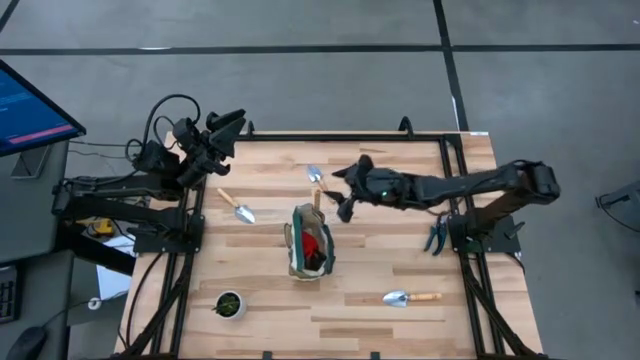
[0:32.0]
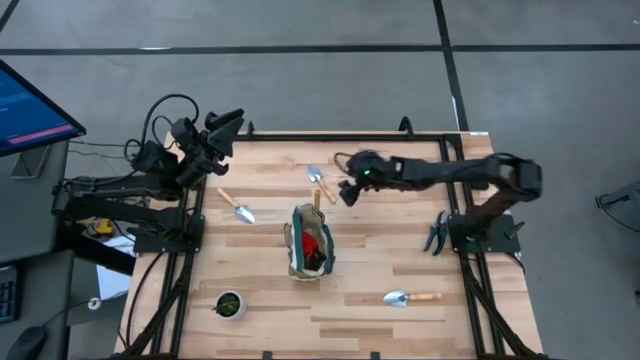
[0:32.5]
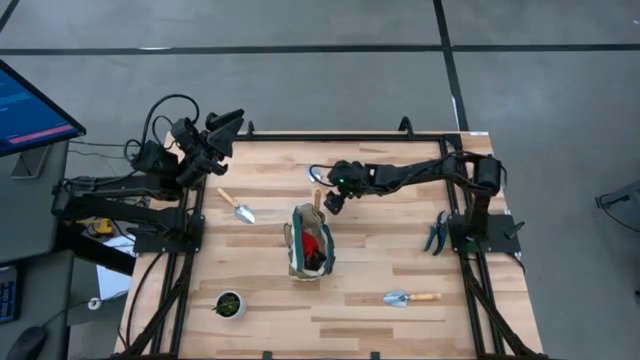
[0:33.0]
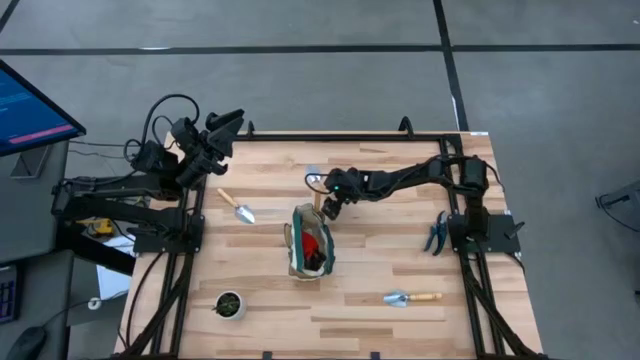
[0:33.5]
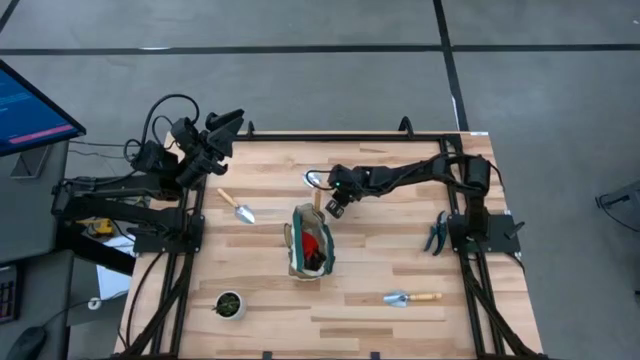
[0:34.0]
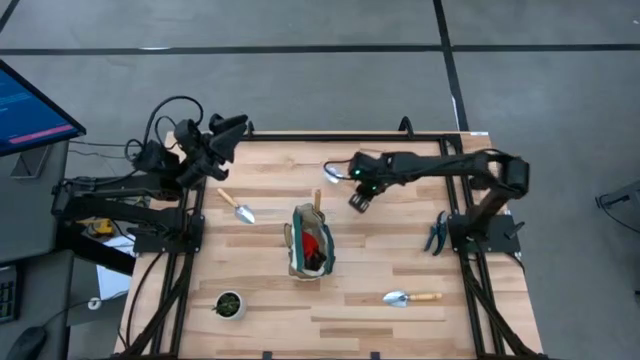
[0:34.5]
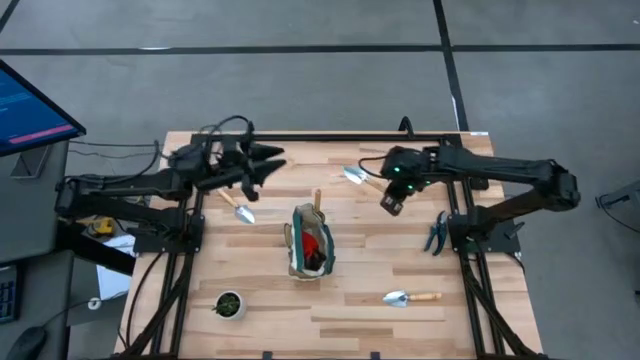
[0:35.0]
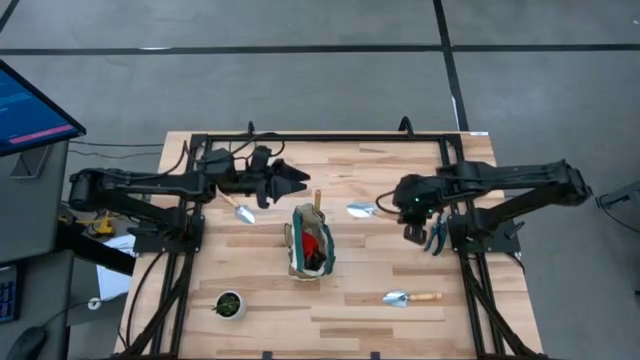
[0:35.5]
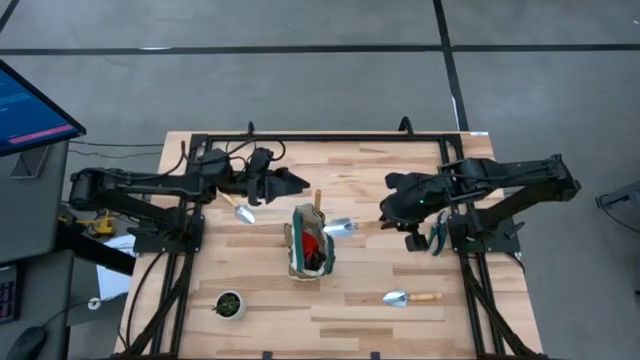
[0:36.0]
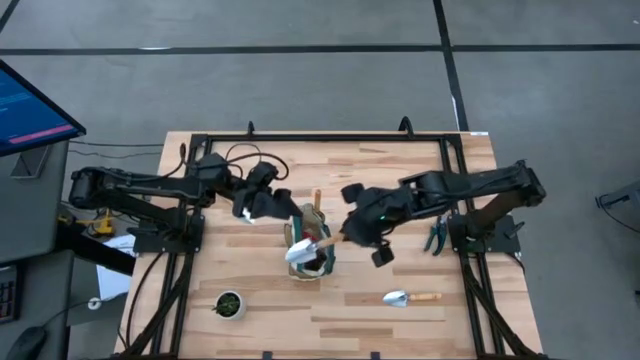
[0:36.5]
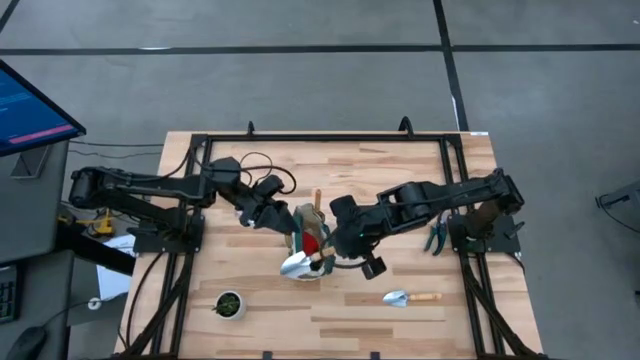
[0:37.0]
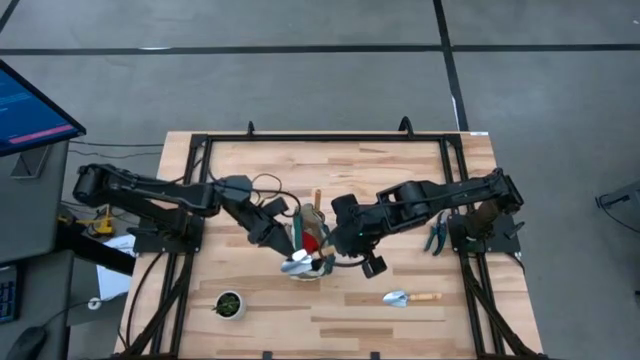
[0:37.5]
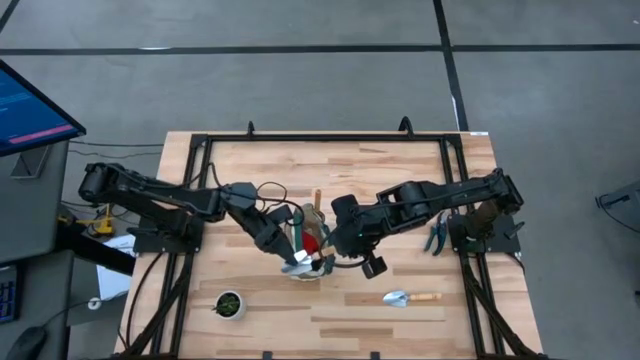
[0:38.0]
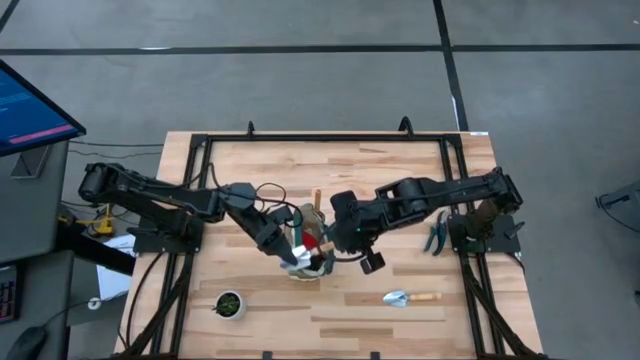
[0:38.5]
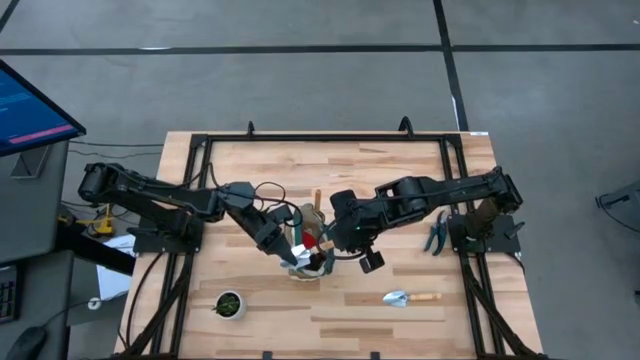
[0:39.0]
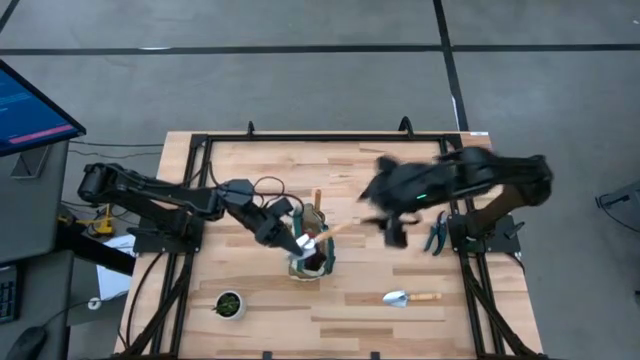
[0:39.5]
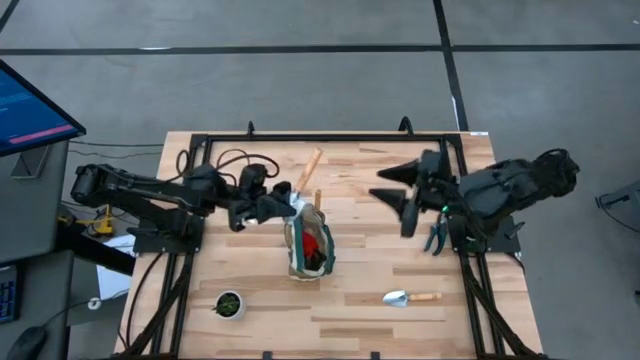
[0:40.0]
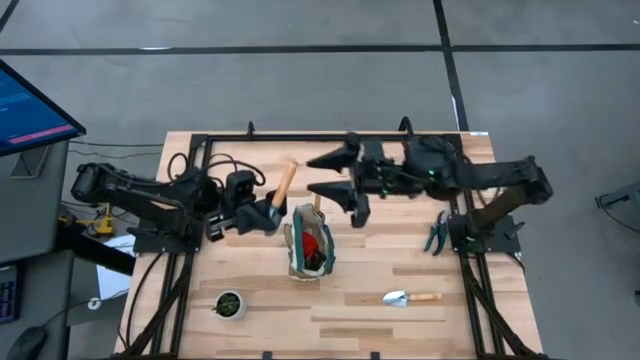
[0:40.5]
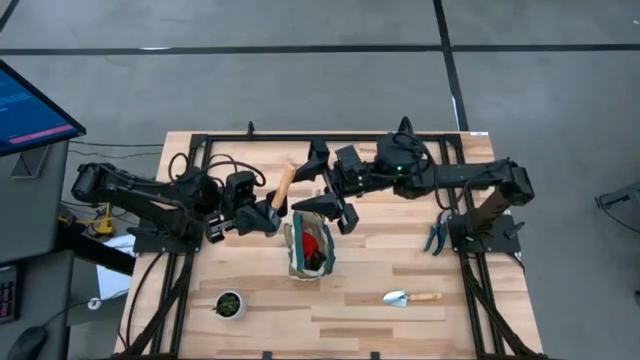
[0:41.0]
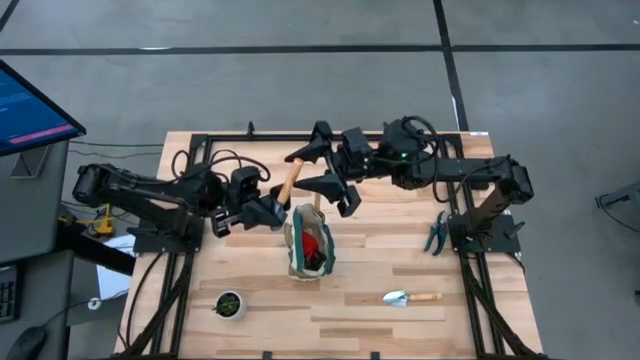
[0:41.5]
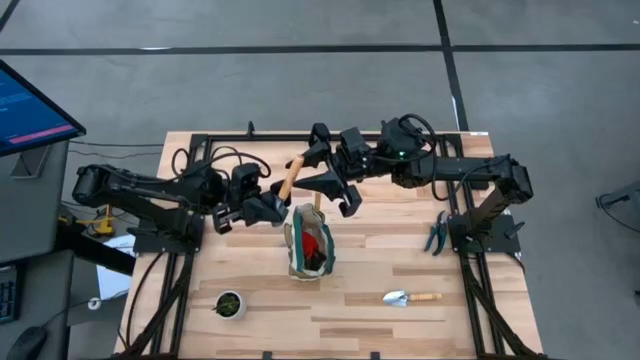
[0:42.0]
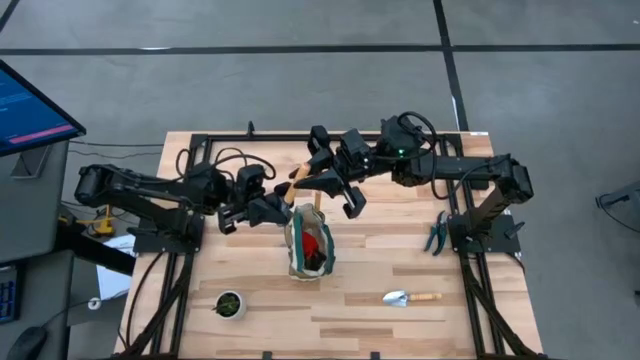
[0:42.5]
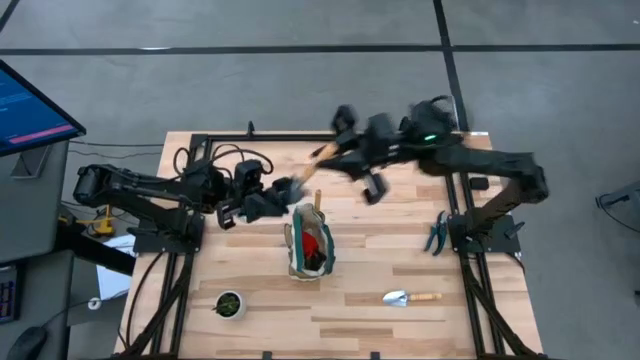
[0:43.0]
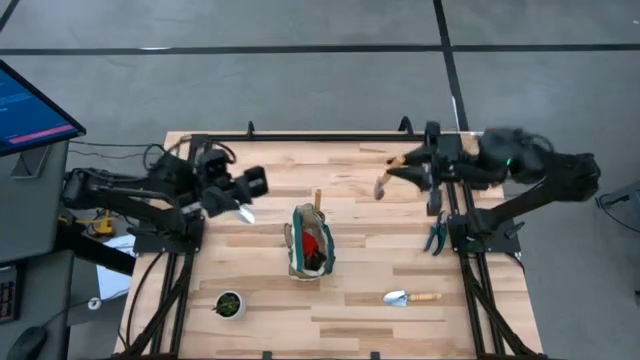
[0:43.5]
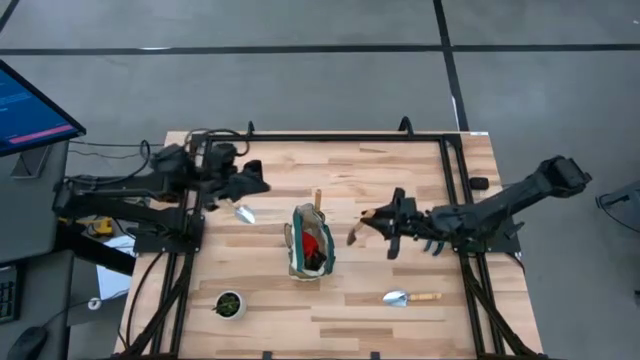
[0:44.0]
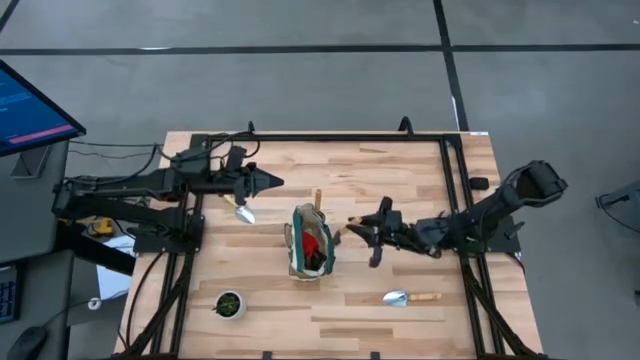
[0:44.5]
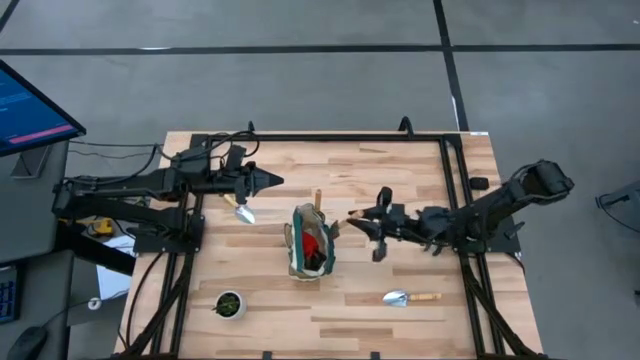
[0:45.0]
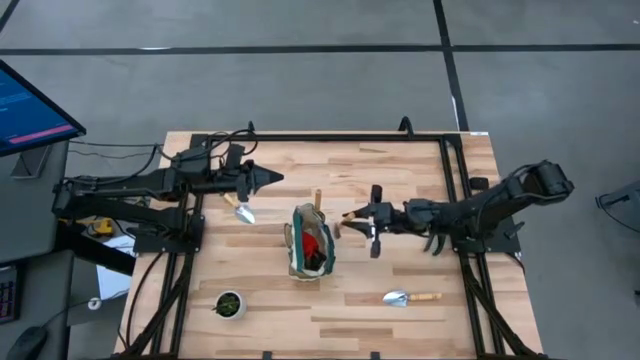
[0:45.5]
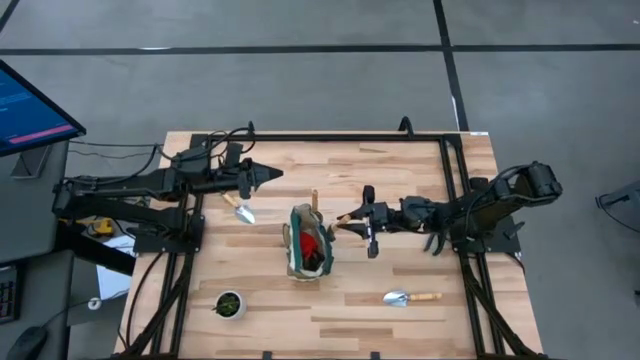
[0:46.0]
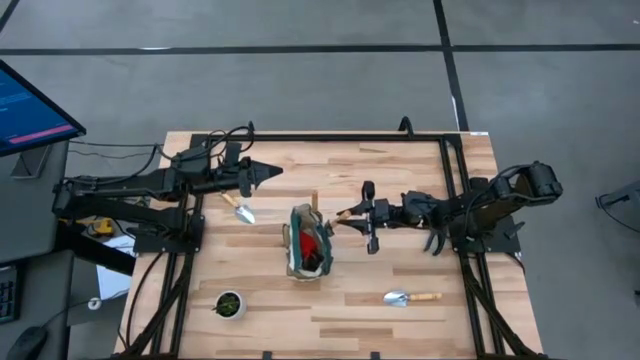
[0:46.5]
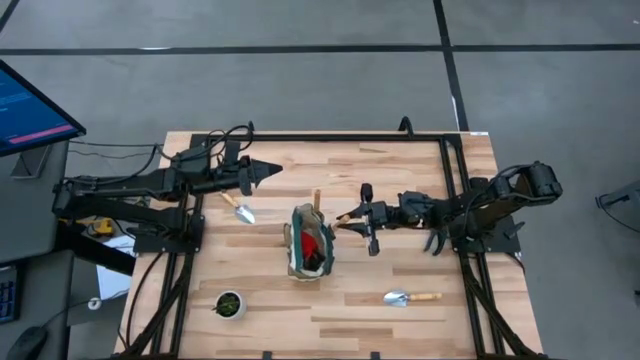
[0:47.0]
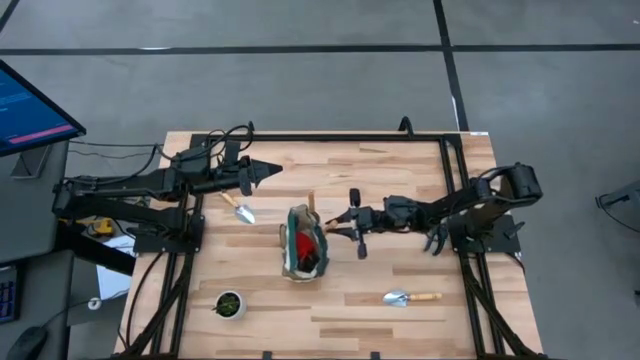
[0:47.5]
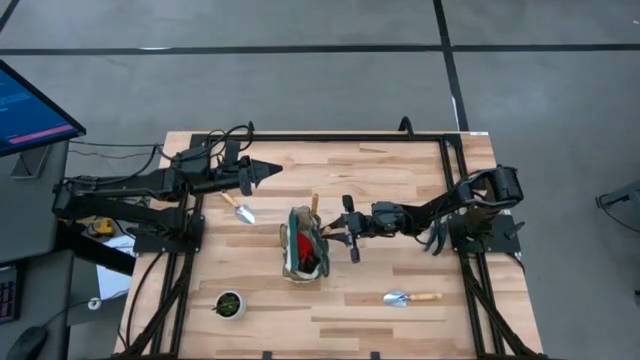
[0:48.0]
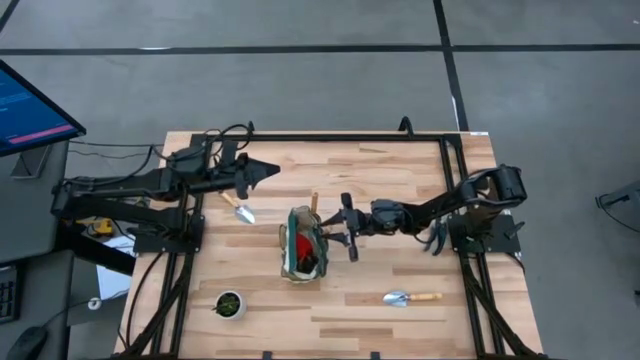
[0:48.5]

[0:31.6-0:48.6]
Task: Pick & Place Garden tools in Gardening bag
Put the brown trowel into the green gardening bag

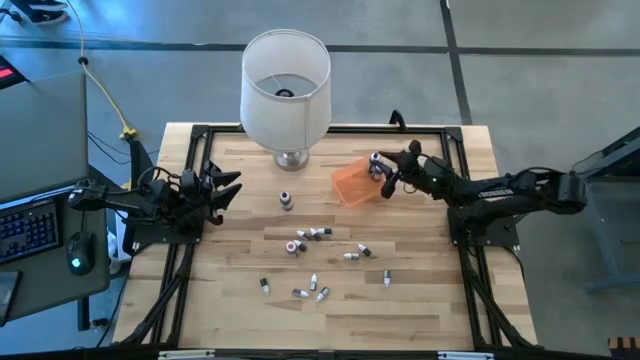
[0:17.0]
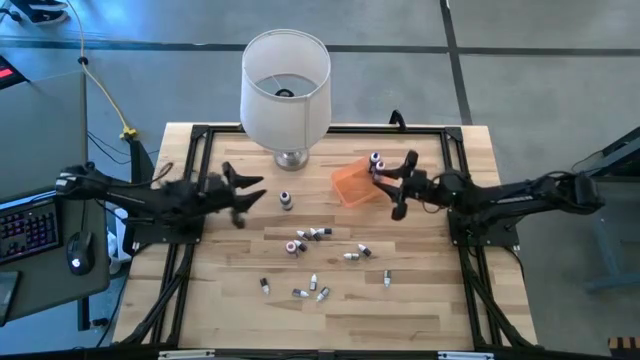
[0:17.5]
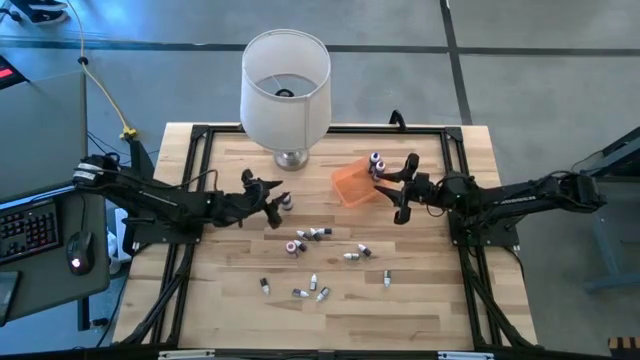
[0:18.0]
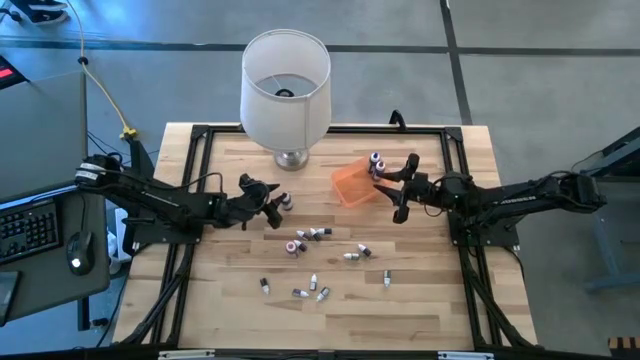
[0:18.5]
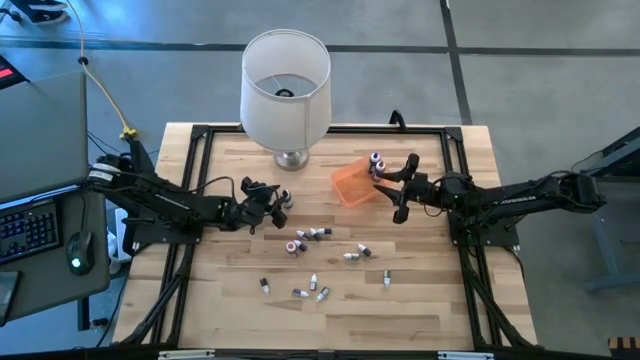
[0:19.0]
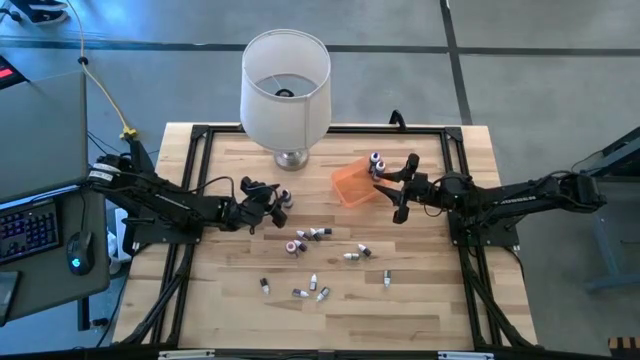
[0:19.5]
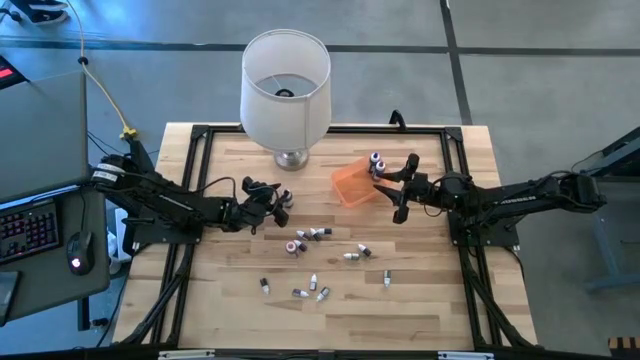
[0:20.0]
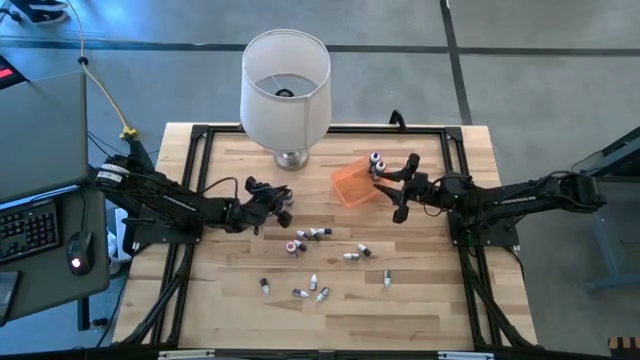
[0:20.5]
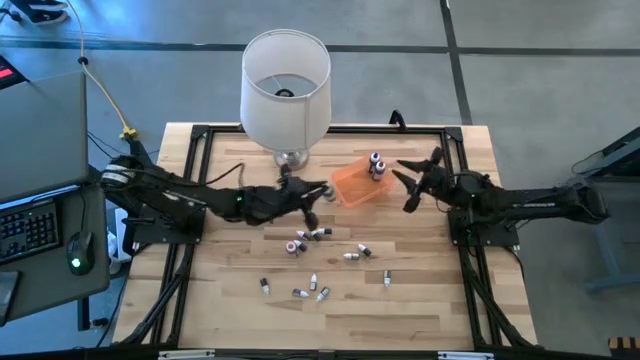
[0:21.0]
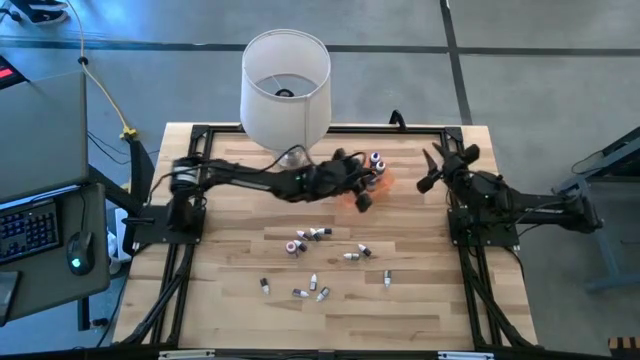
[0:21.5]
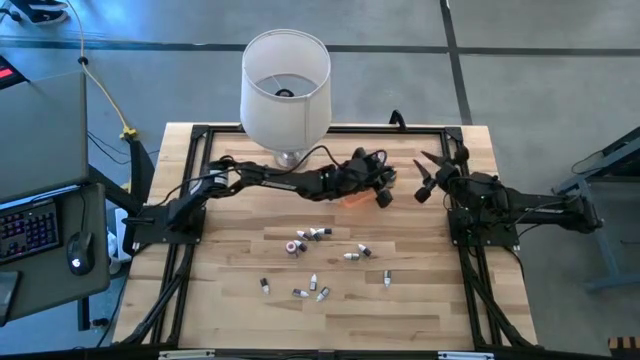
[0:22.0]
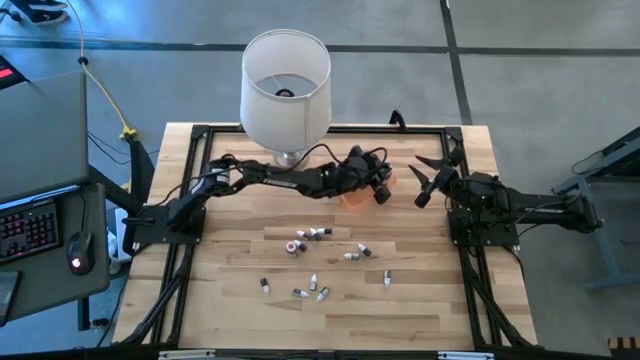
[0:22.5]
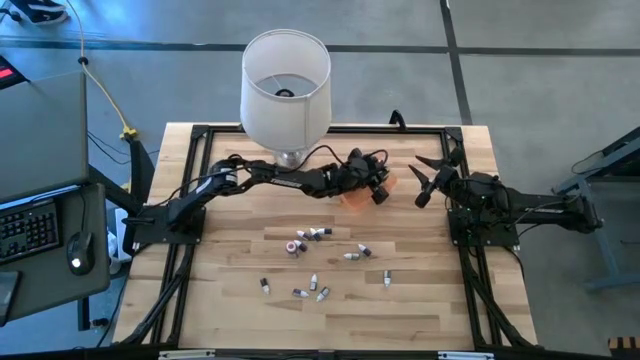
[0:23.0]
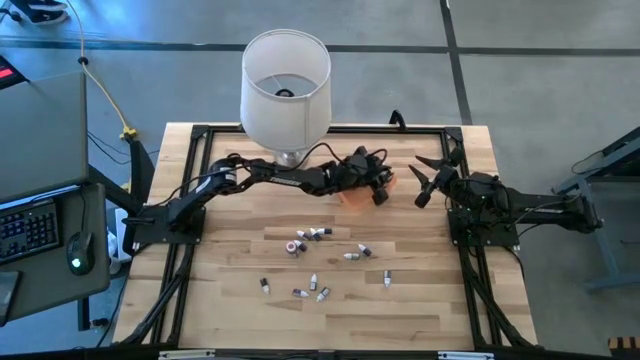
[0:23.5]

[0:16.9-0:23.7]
Task: Pick & Place food coloring
Put the large black food coloring bottle into the orange bin
